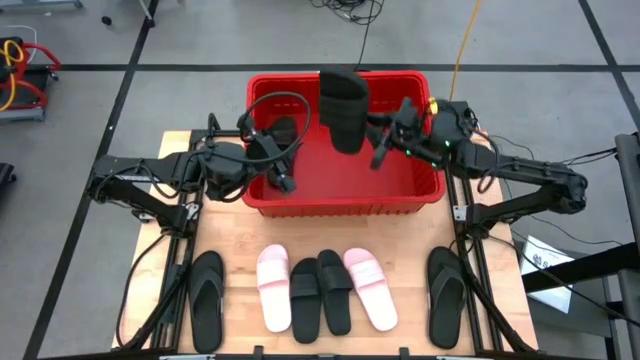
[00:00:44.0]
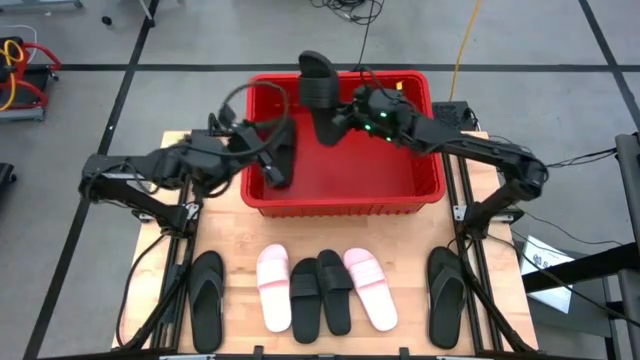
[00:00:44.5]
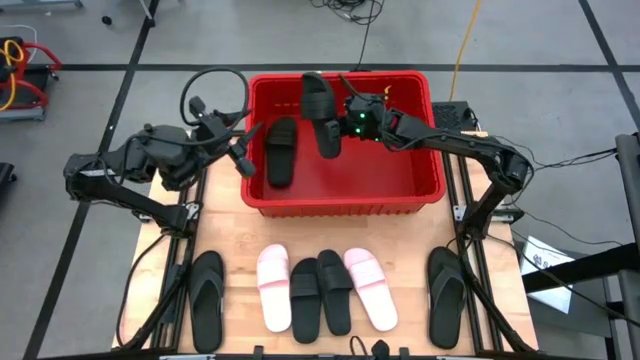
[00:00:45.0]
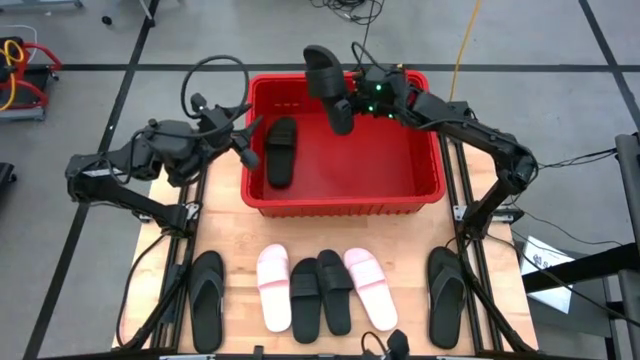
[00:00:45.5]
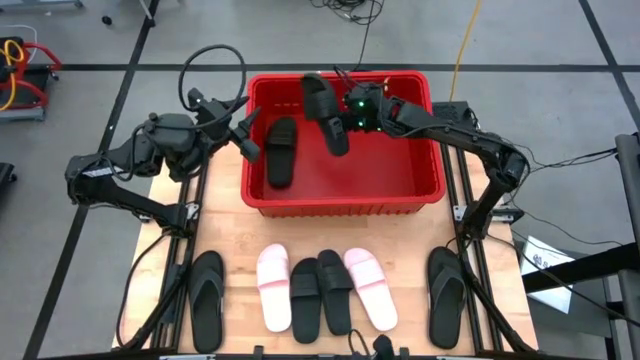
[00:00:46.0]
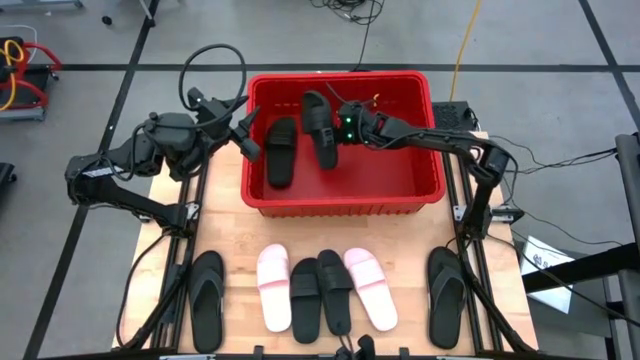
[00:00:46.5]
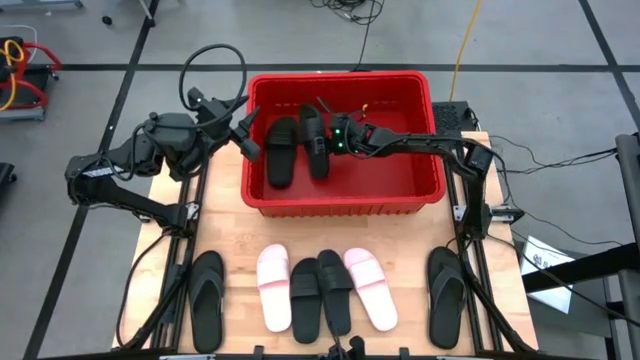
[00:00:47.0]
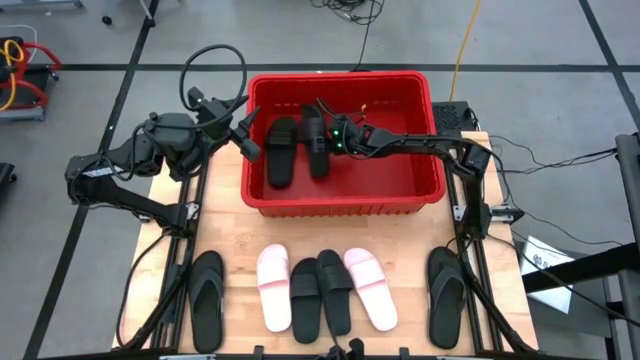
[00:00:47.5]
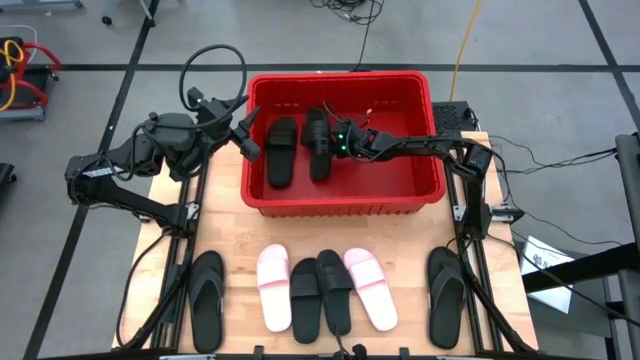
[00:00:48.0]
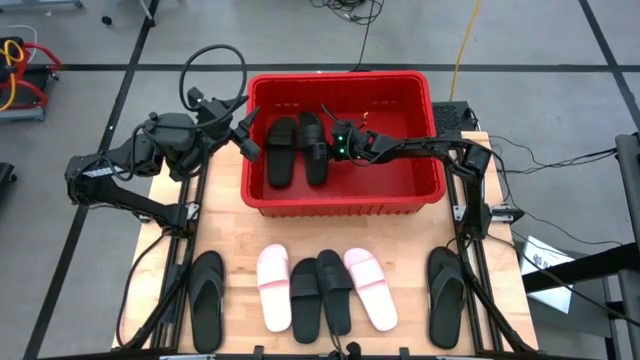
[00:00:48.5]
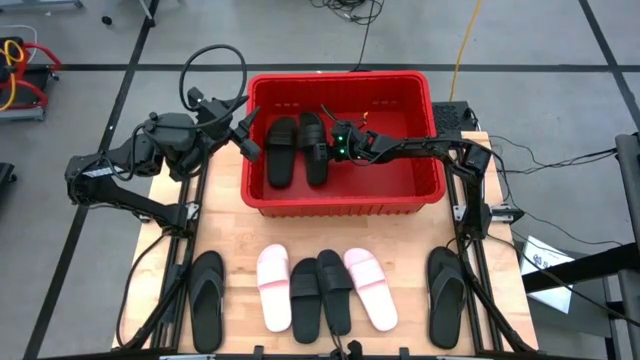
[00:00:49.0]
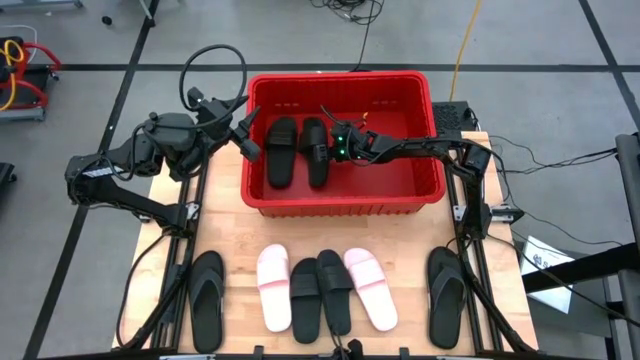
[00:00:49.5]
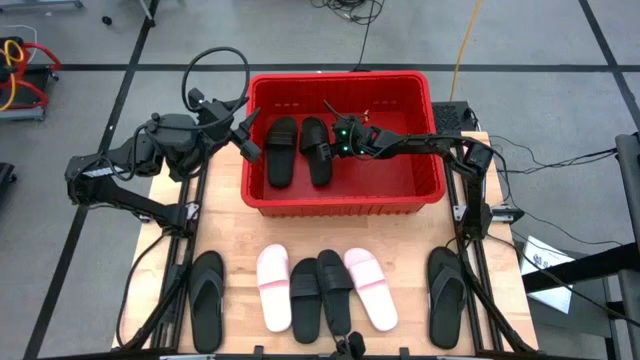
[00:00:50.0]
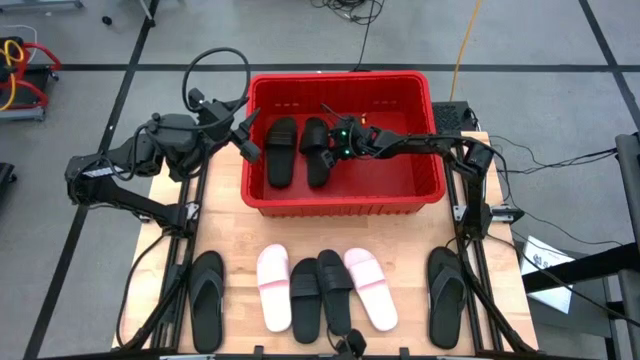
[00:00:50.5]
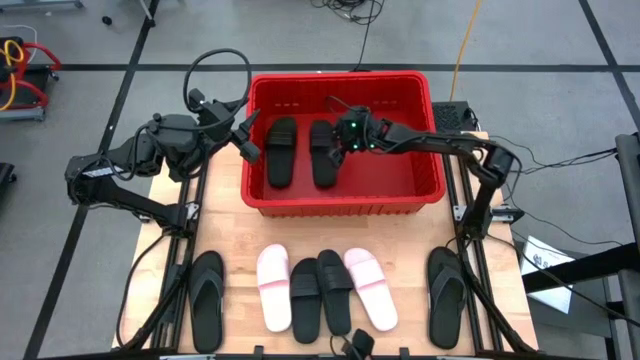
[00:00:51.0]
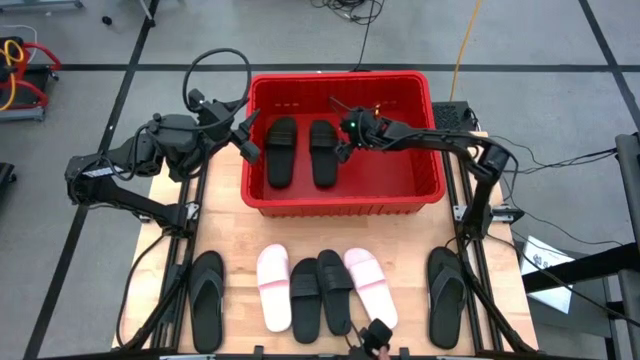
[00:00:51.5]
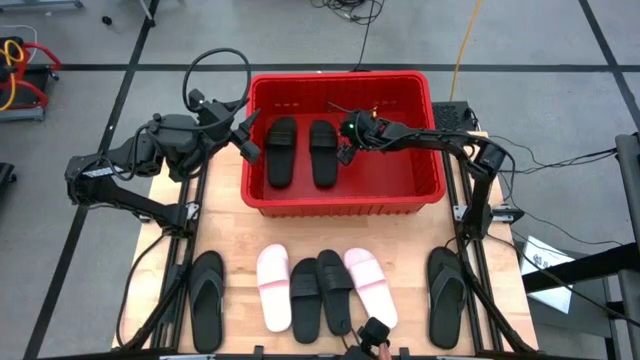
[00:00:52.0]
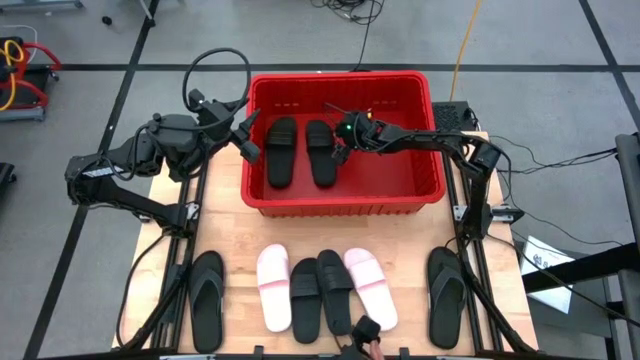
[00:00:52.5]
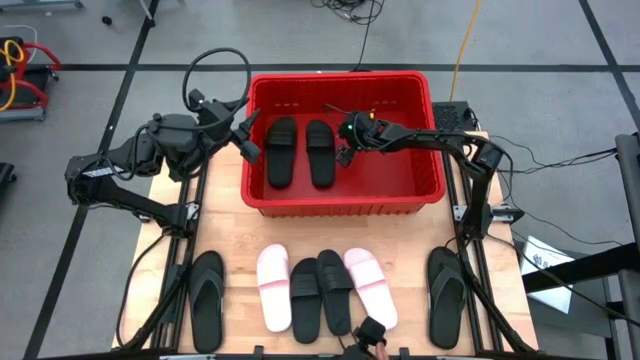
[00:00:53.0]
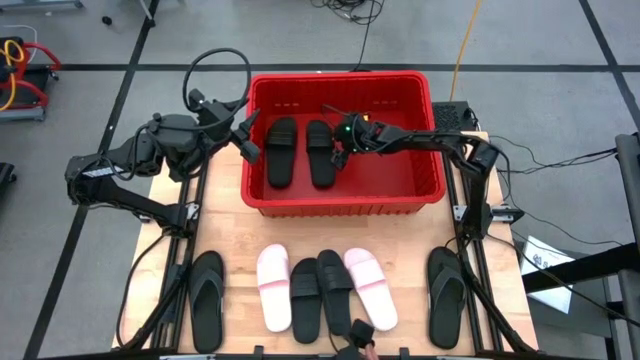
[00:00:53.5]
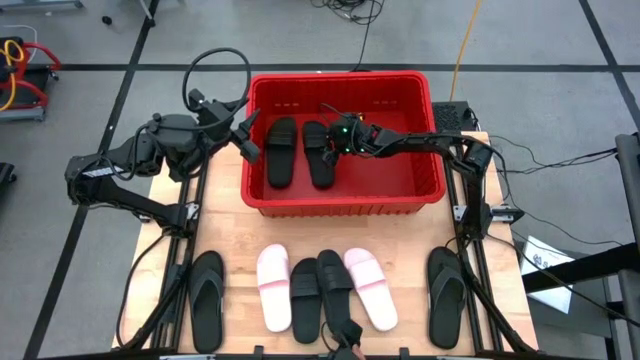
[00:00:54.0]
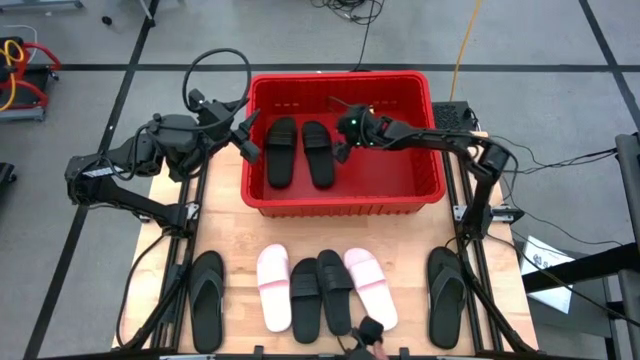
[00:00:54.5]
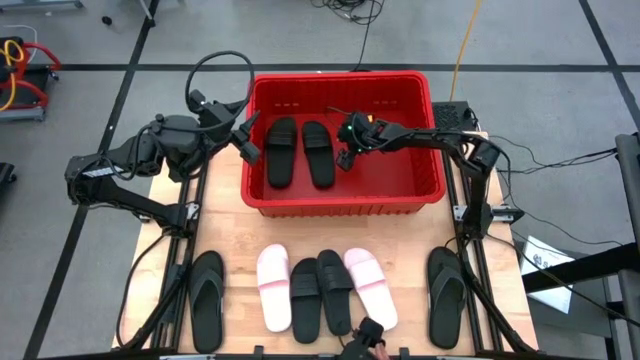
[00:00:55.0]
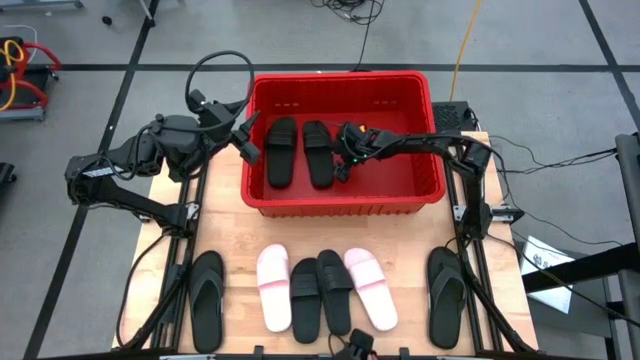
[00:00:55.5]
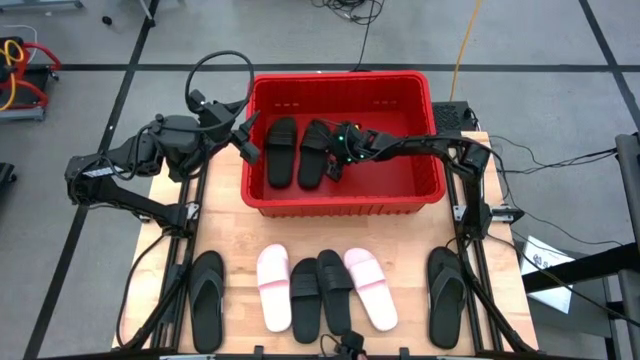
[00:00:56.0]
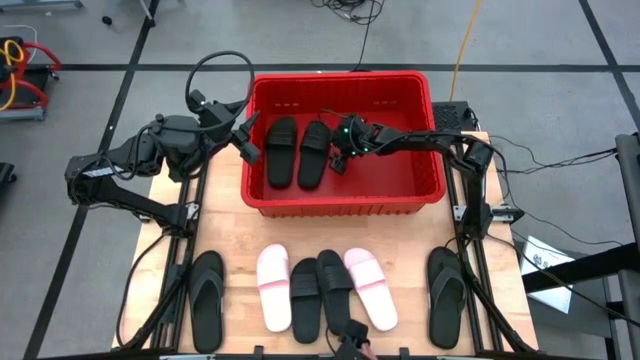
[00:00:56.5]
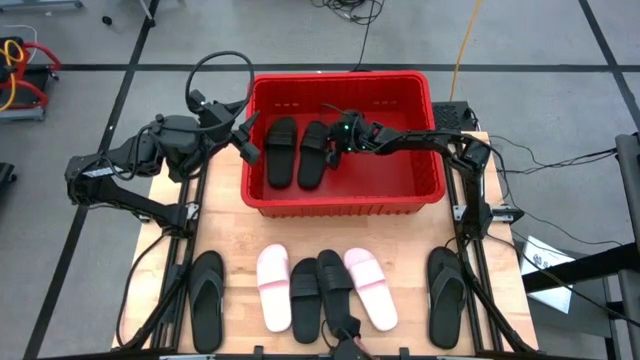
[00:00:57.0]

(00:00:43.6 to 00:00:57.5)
Task: Pick and place slides into bin
Put the black slide into the red container

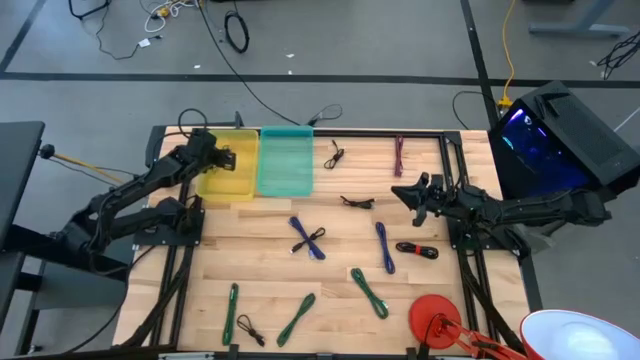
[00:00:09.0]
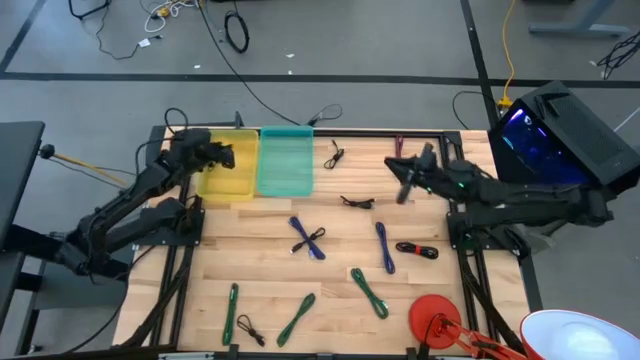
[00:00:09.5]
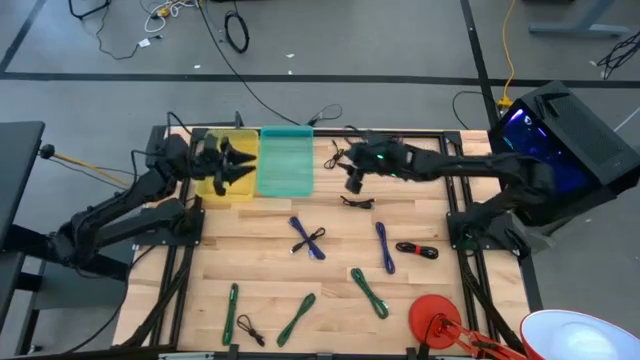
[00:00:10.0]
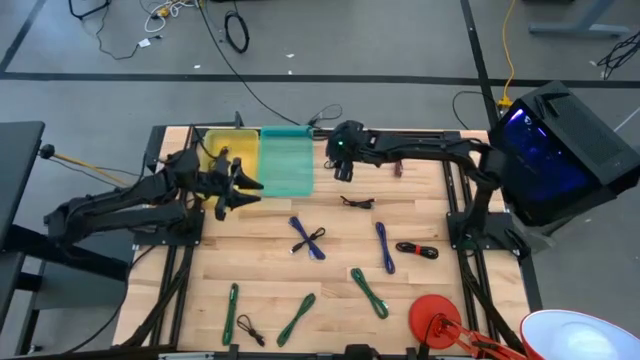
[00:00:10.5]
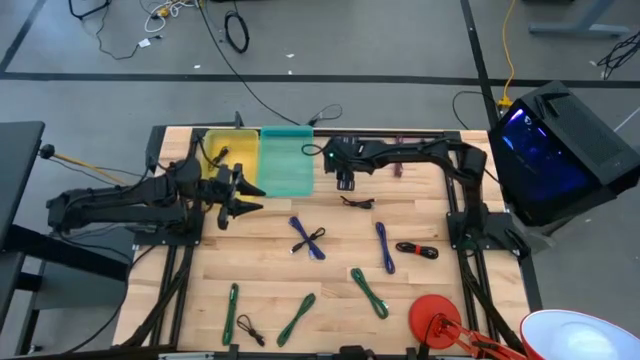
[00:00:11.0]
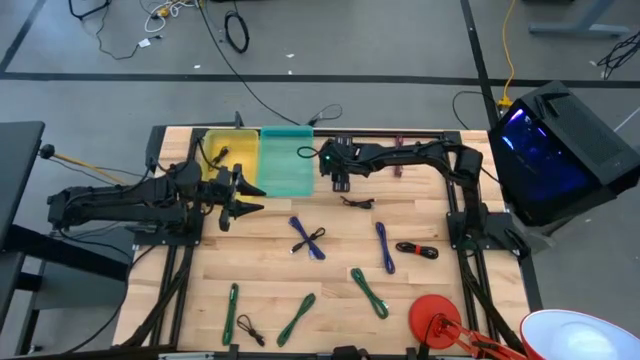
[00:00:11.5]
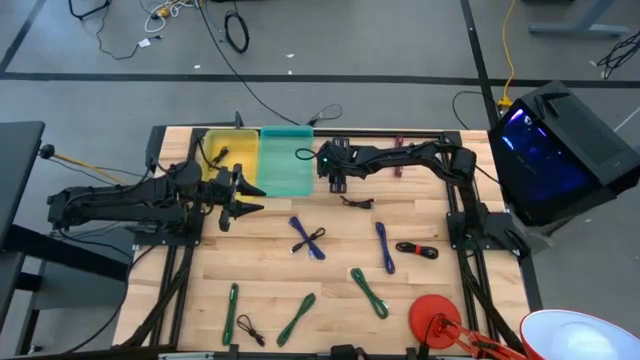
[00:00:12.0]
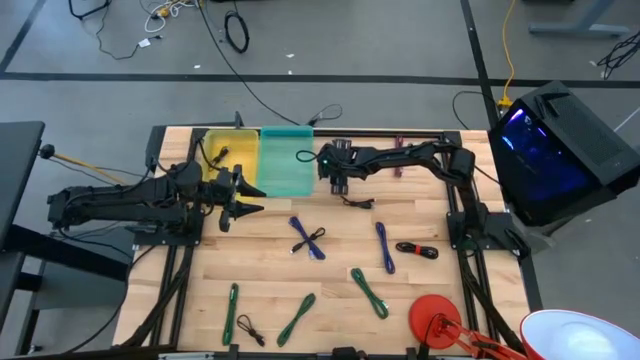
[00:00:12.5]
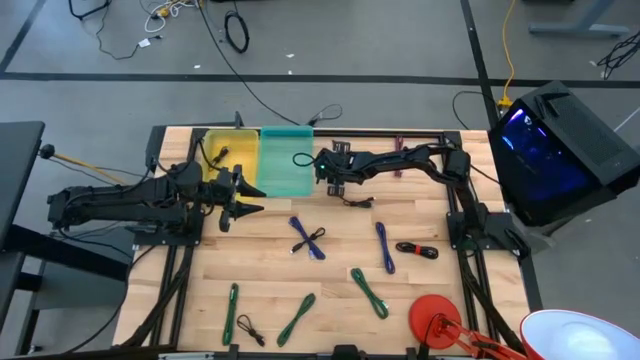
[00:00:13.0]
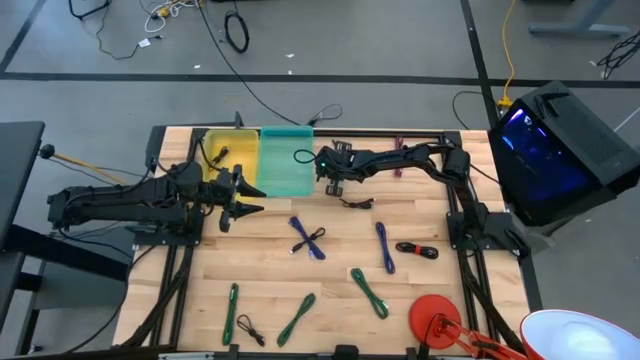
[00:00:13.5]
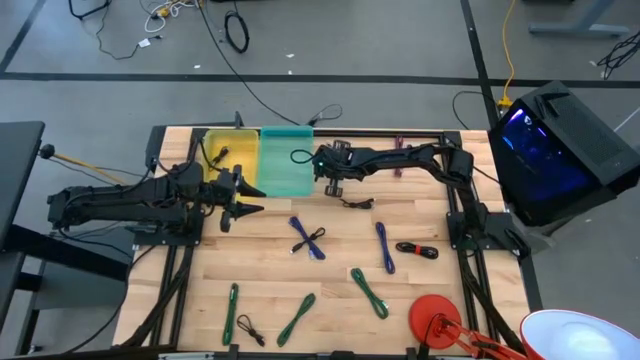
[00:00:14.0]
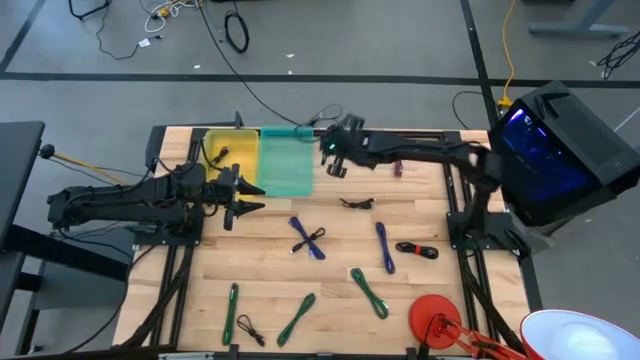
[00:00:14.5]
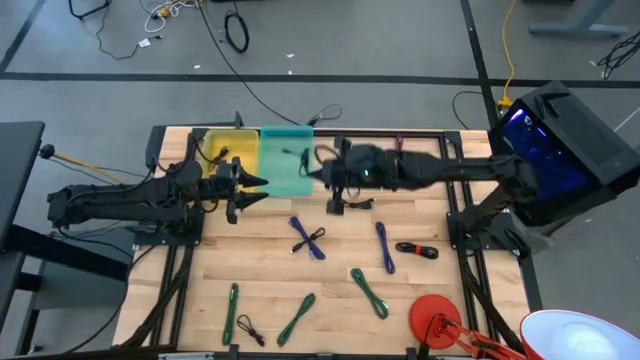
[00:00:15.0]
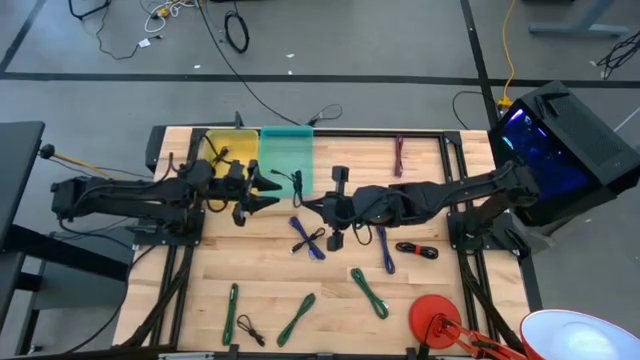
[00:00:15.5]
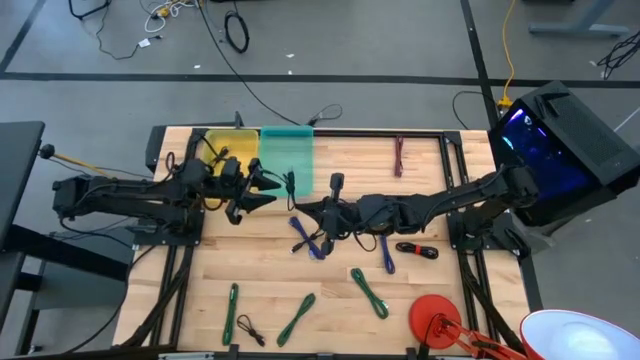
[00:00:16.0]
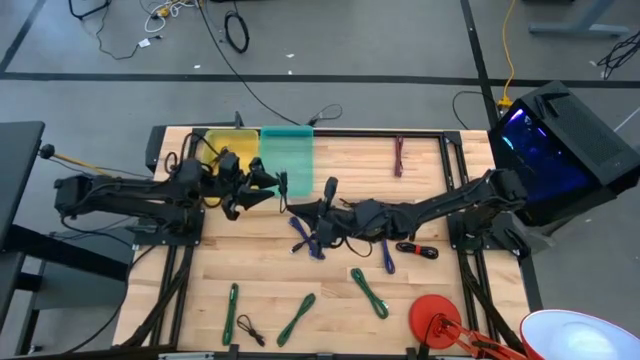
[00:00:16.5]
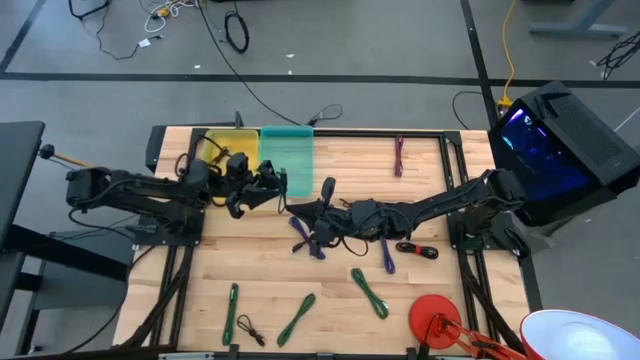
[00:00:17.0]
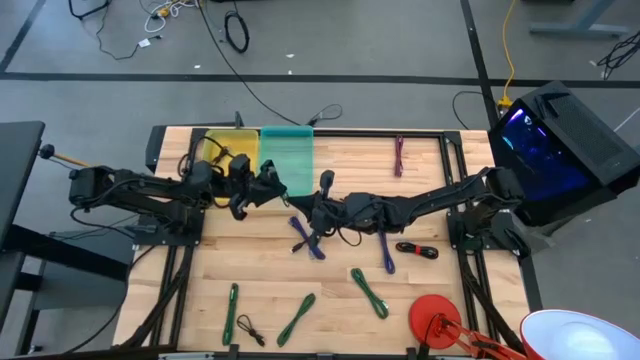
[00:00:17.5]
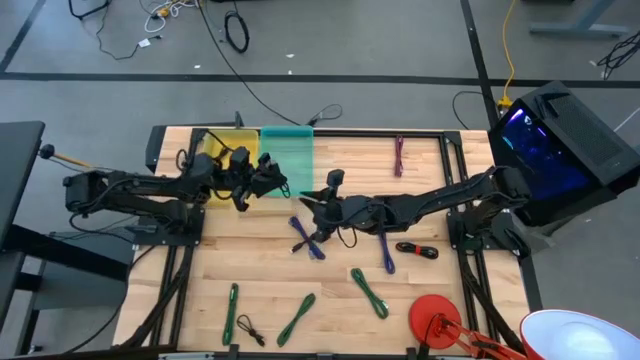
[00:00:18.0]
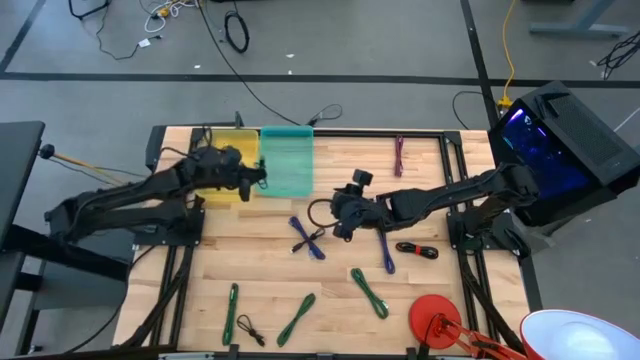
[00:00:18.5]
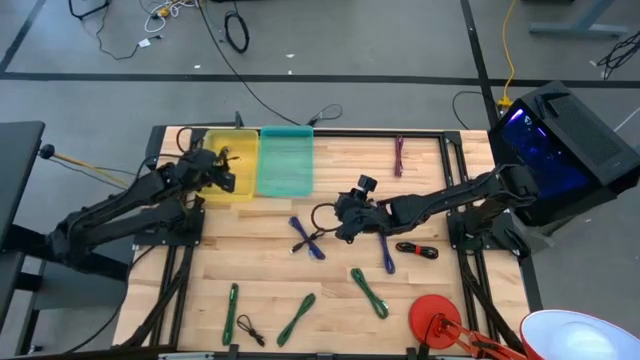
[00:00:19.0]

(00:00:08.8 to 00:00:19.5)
Task: Pick & Place USB Port
Put the black charger cable into the yellow bin
